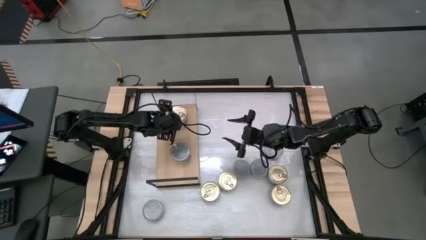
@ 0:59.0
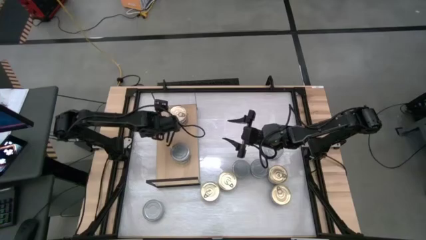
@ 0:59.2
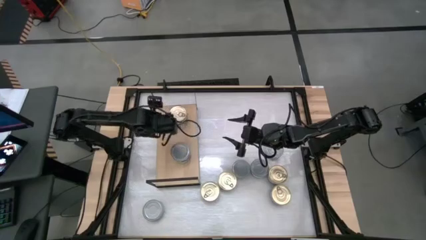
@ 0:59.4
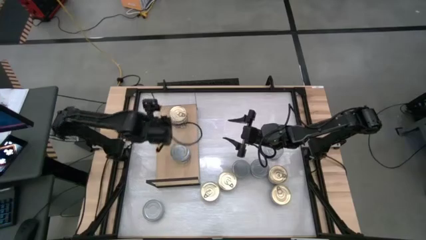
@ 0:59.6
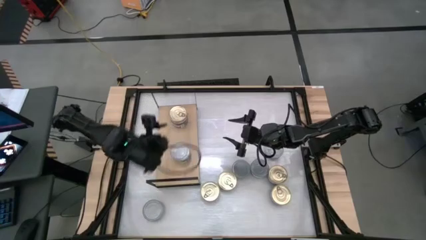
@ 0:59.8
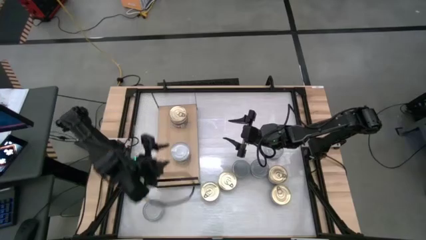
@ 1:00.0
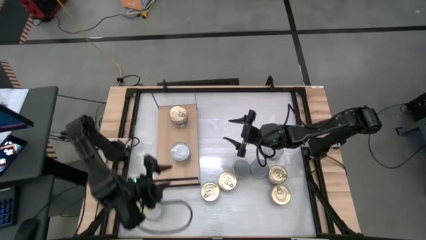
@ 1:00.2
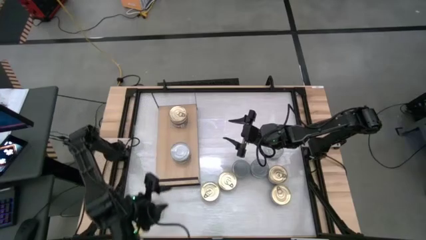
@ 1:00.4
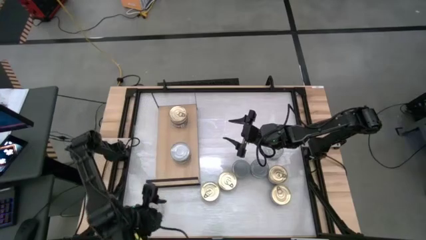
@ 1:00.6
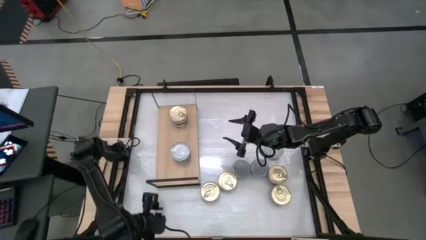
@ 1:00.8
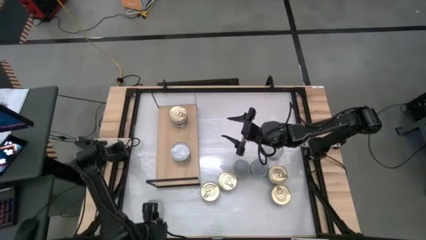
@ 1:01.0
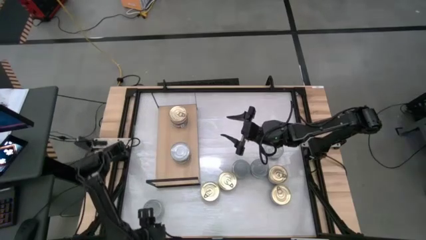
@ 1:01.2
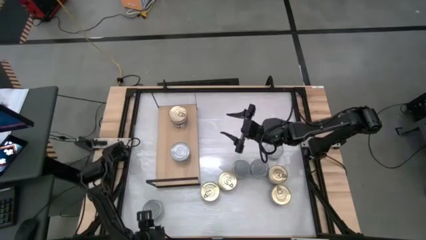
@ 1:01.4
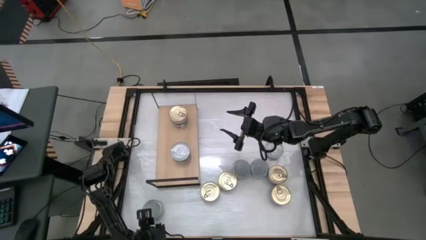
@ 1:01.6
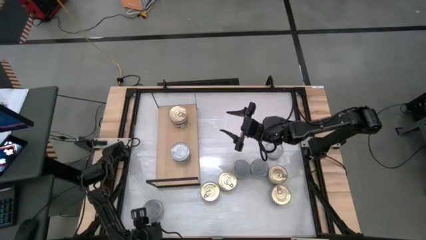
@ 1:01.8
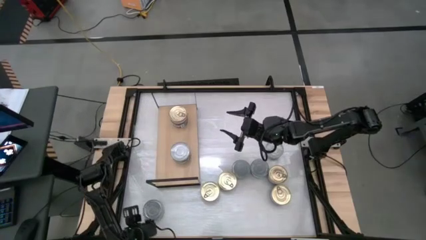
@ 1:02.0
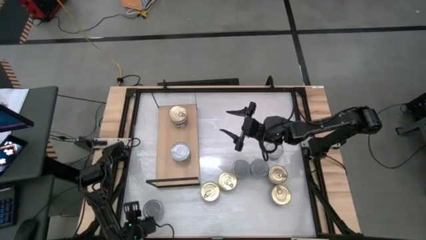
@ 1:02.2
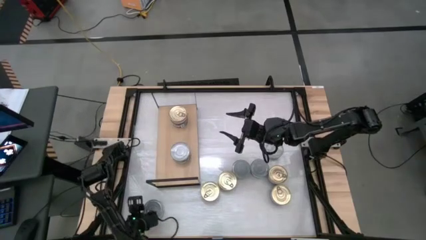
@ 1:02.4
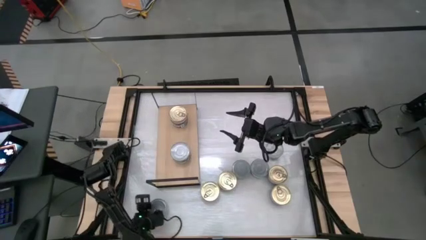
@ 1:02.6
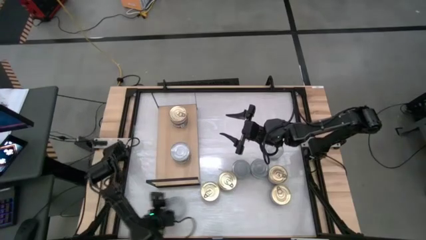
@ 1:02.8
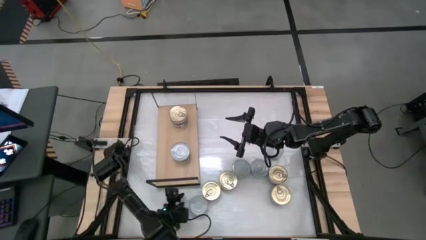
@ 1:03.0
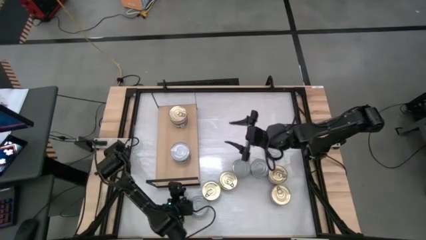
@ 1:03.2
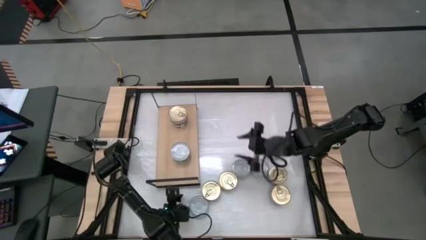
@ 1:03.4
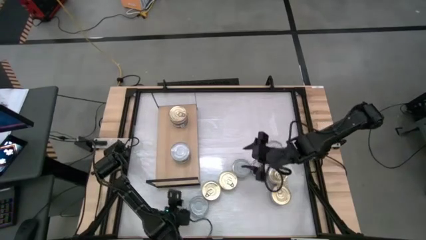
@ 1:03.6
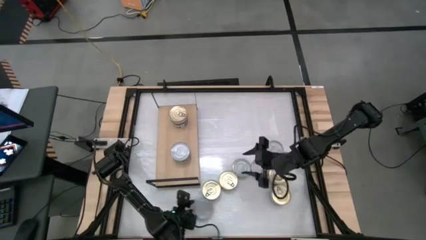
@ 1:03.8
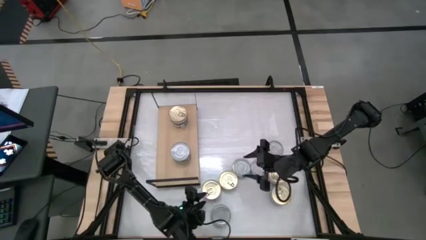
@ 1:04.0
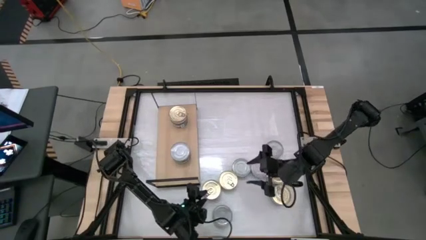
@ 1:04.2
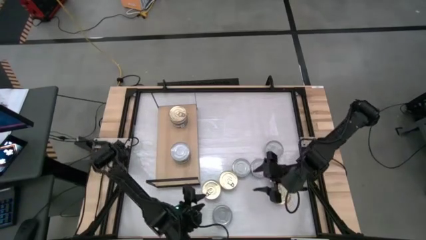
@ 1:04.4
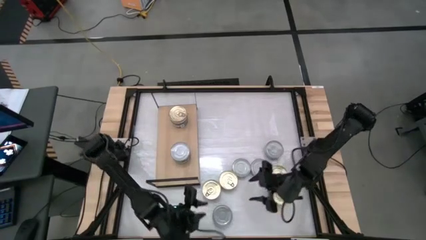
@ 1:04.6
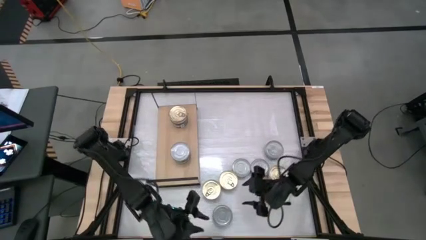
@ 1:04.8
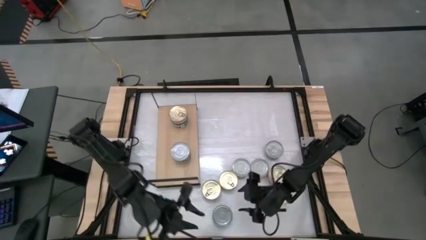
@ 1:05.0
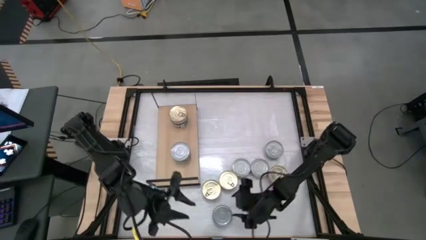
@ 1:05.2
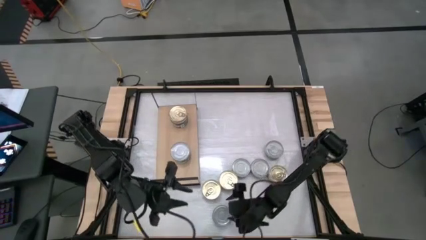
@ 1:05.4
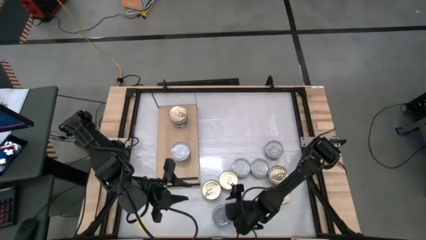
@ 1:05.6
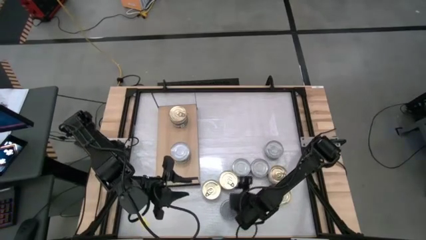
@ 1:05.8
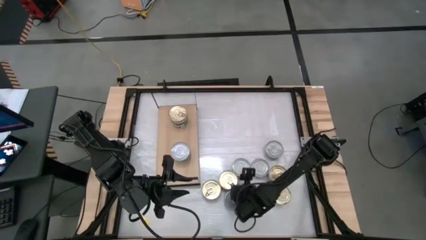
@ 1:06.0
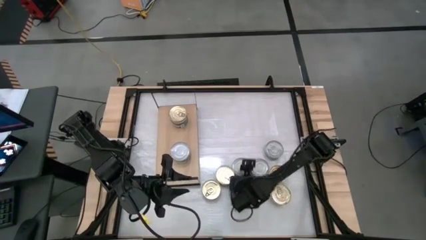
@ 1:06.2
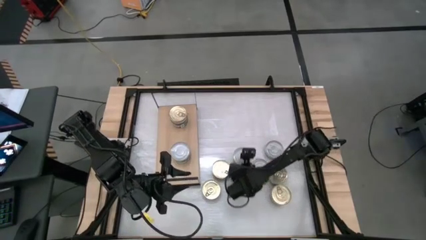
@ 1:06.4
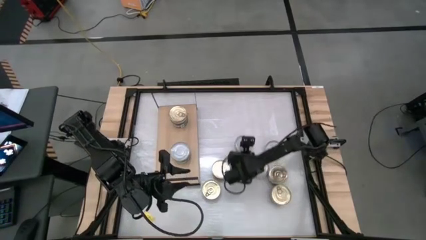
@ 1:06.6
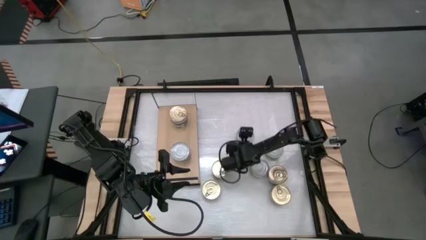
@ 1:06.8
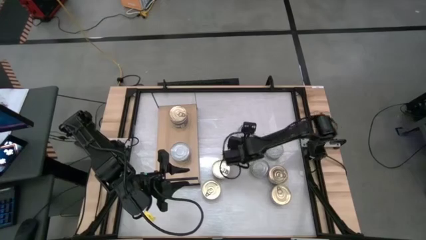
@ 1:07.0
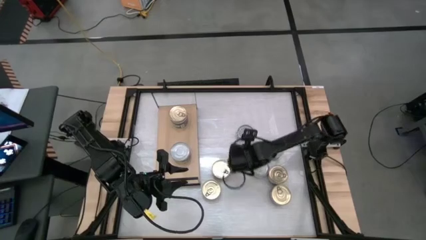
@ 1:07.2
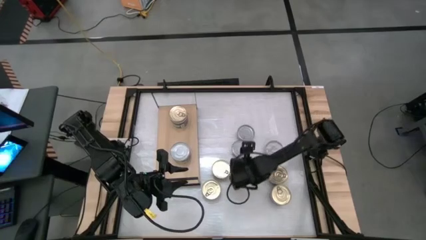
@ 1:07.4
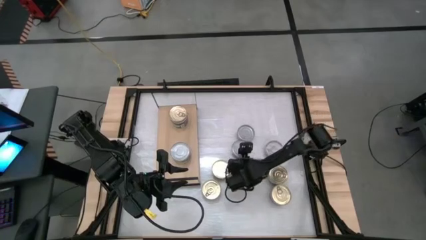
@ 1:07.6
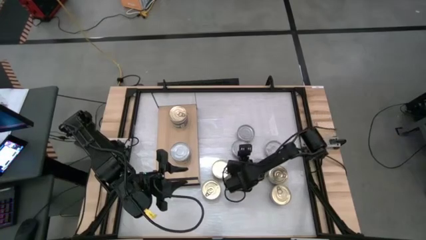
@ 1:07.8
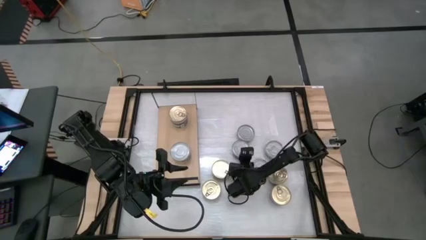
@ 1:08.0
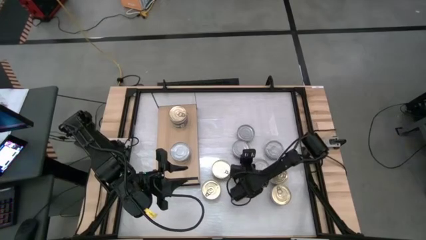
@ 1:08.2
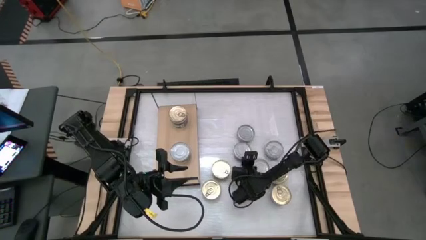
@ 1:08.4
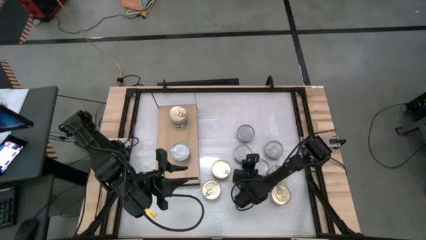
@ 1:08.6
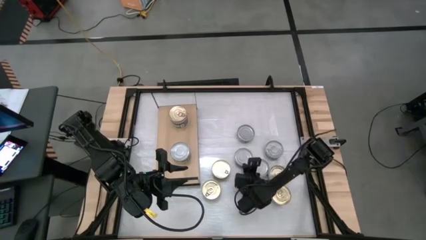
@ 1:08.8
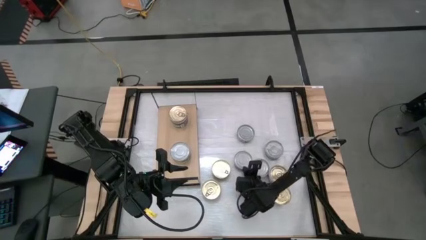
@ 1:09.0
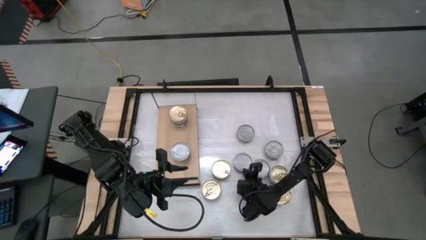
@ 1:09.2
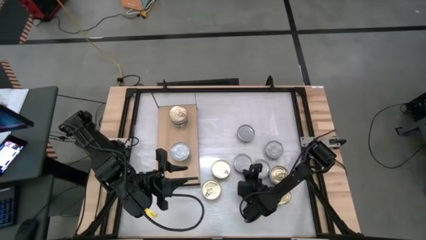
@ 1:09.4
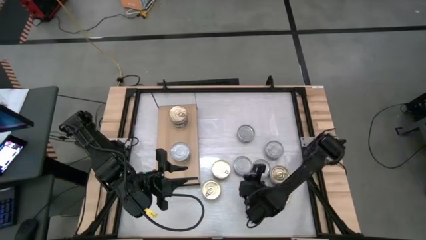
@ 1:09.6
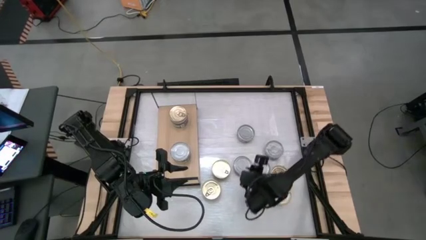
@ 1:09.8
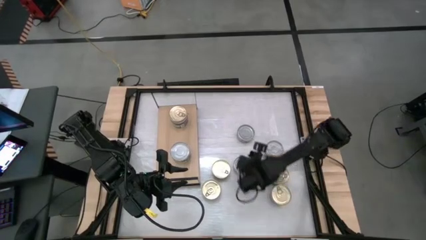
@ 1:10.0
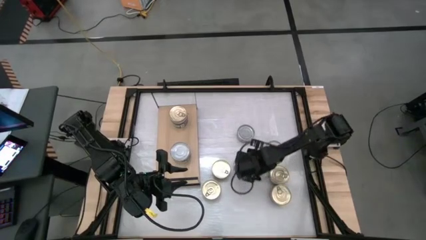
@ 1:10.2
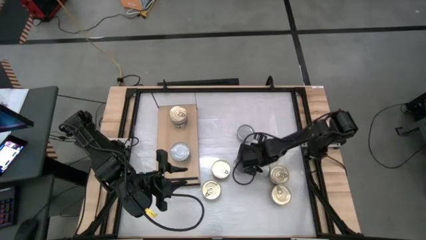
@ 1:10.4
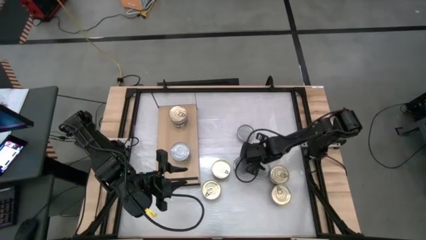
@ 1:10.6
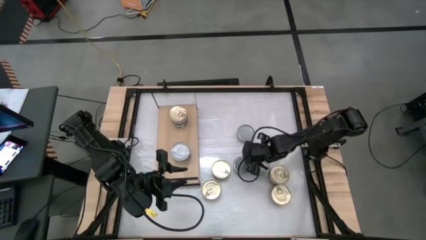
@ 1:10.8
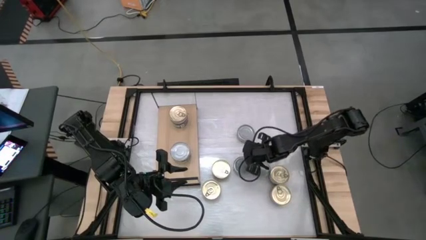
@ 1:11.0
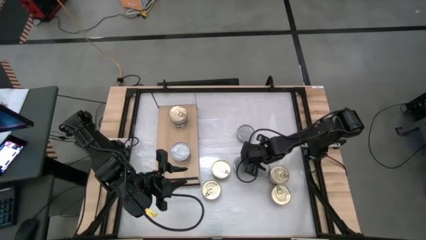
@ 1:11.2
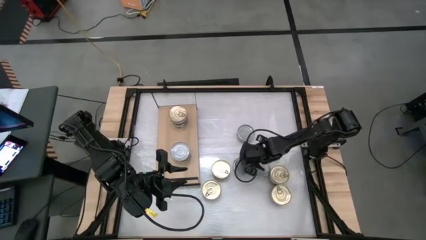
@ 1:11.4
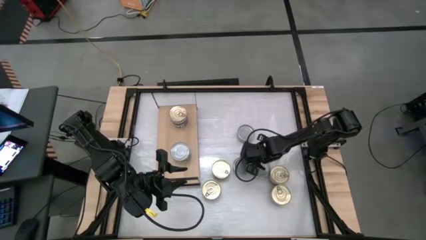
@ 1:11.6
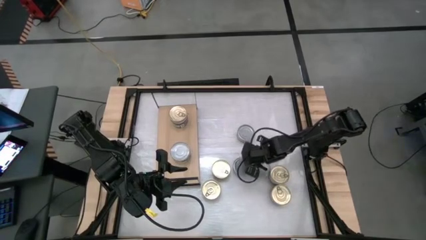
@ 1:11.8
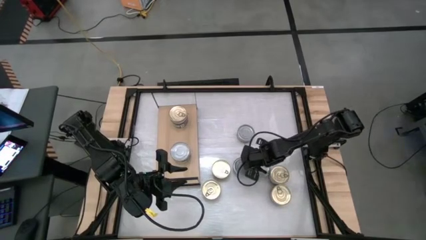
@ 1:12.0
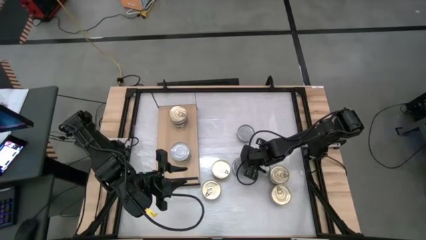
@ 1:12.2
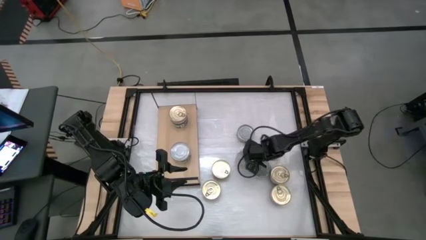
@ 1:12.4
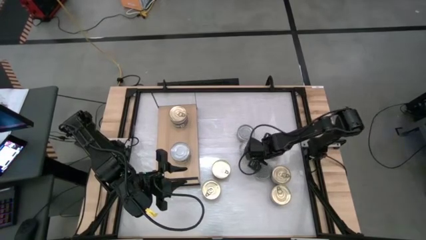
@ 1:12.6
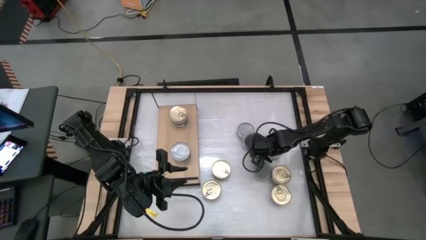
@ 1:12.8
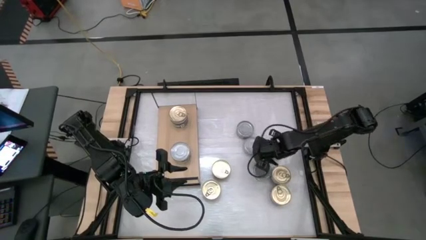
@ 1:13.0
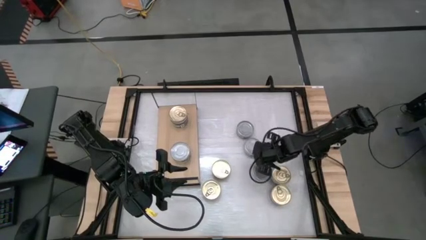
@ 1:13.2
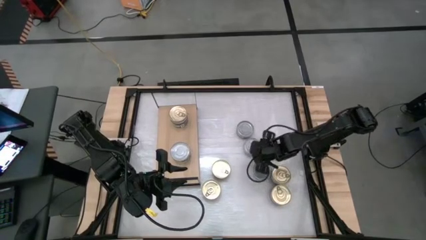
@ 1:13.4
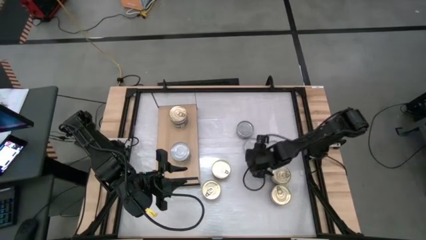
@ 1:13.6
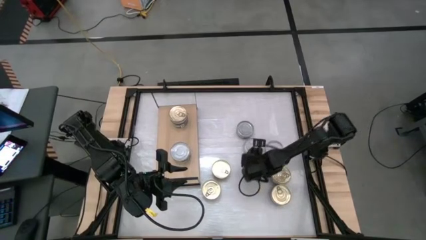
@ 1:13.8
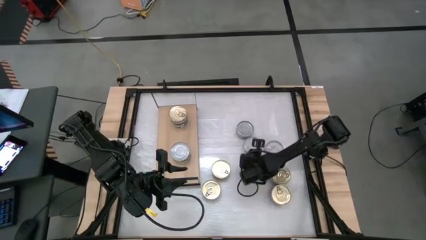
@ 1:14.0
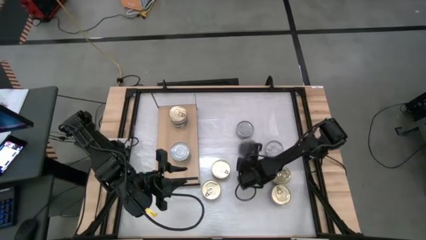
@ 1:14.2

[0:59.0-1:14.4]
Task: Stack canned seafood by type on shelf
Stack the green tuna can on top of the other green tuna can on the shelf

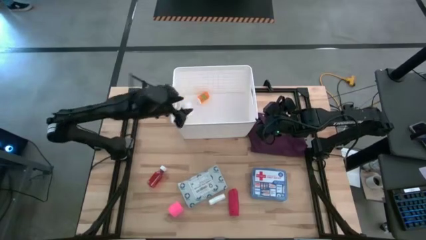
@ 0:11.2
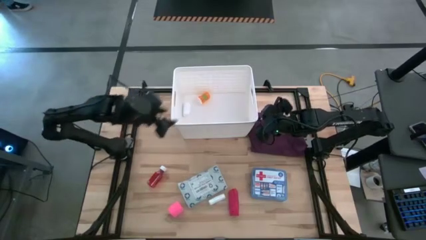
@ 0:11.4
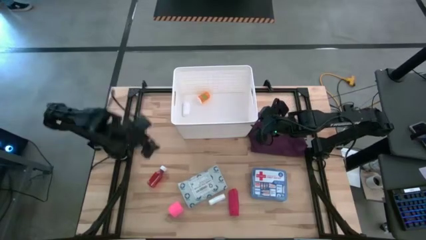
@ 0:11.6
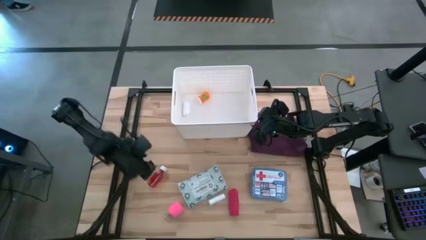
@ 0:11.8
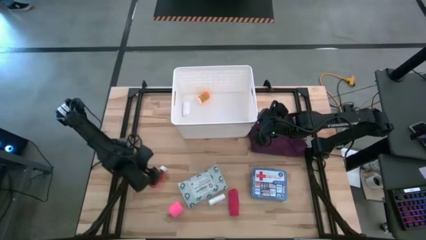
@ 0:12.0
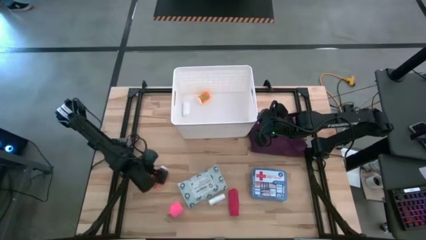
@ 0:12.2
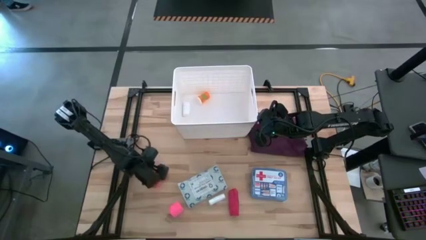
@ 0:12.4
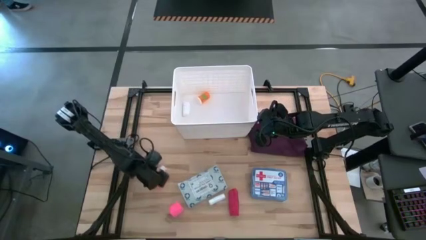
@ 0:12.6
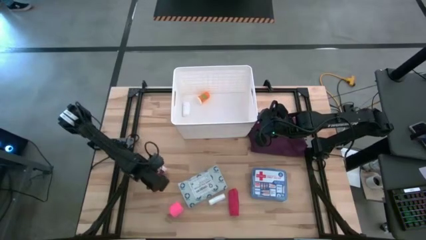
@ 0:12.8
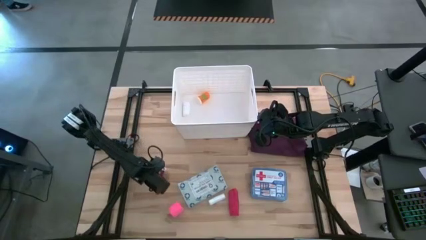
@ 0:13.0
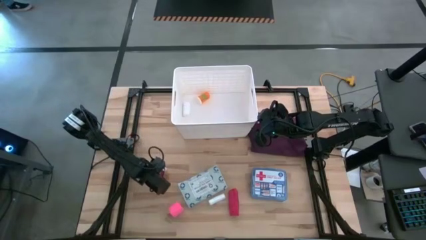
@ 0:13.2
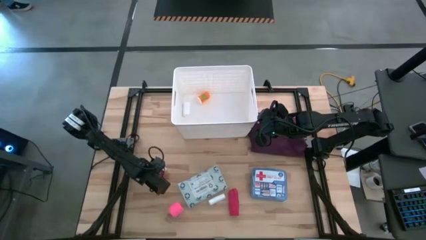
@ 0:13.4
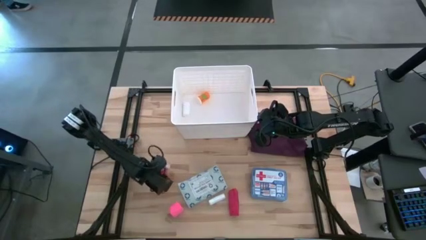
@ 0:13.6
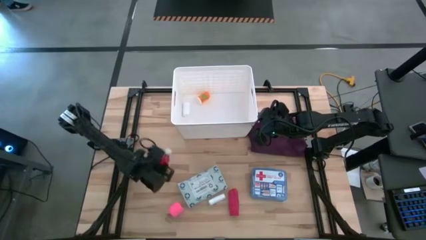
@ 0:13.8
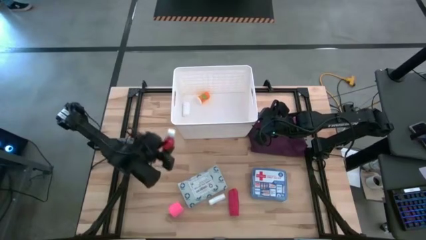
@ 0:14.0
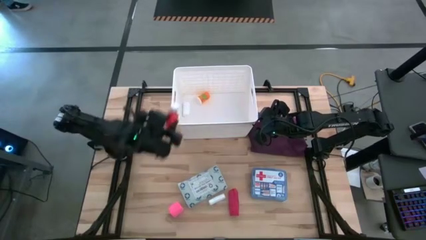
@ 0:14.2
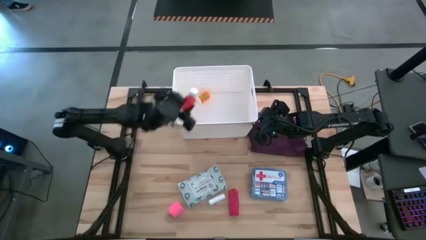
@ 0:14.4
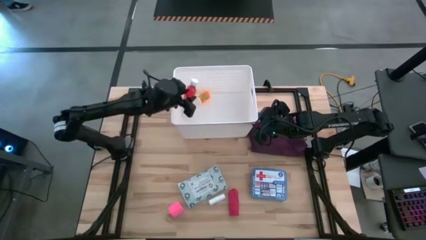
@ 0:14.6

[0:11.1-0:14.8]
Task: Pick & place medical supplies in basket/bin
Put the red pill bottle into the white bin
